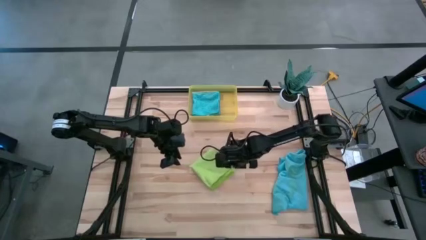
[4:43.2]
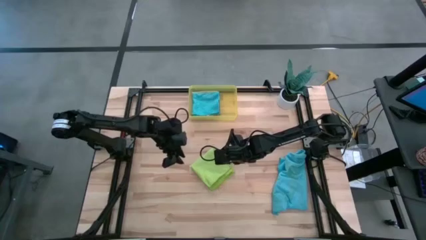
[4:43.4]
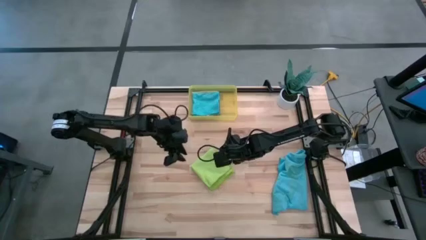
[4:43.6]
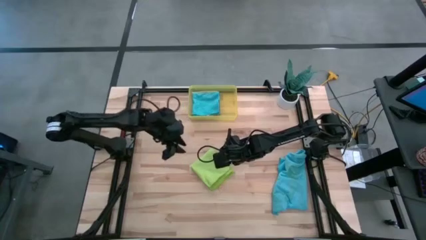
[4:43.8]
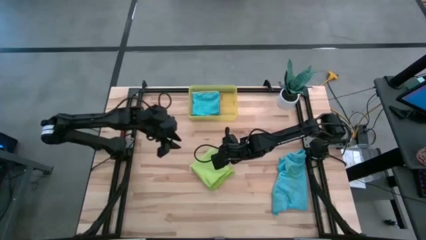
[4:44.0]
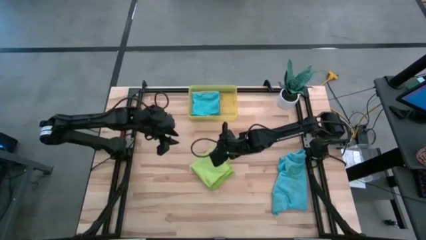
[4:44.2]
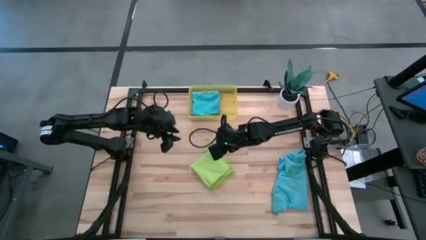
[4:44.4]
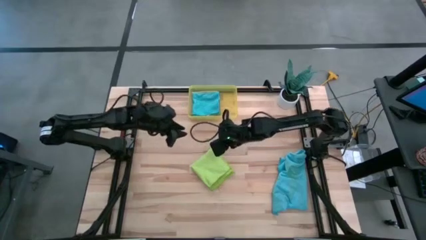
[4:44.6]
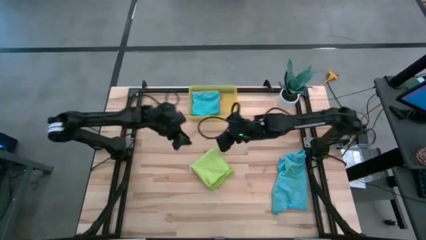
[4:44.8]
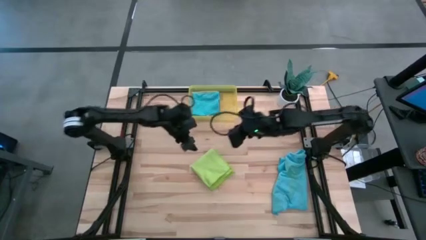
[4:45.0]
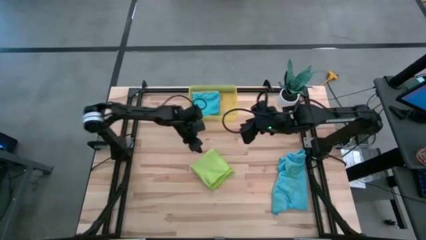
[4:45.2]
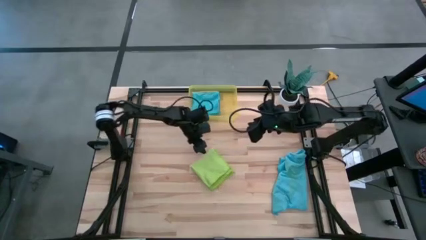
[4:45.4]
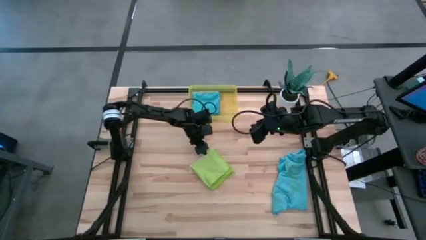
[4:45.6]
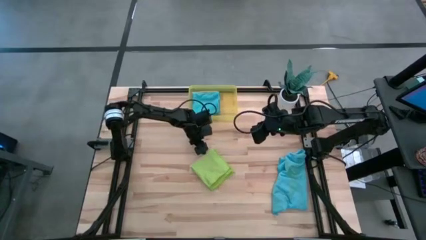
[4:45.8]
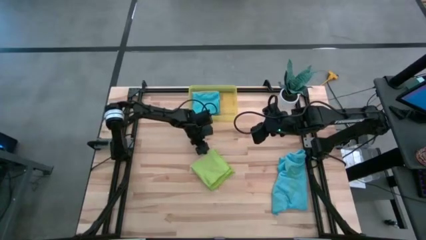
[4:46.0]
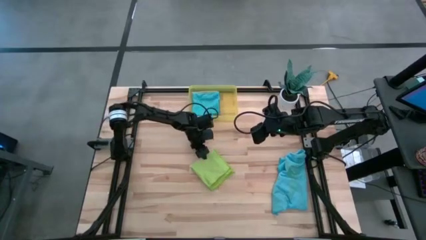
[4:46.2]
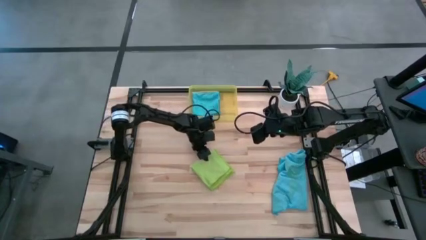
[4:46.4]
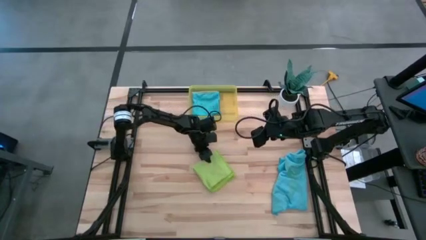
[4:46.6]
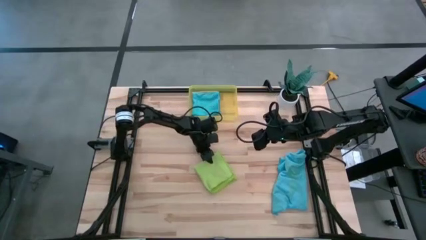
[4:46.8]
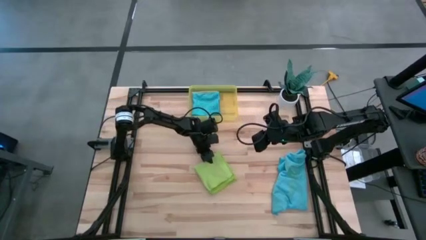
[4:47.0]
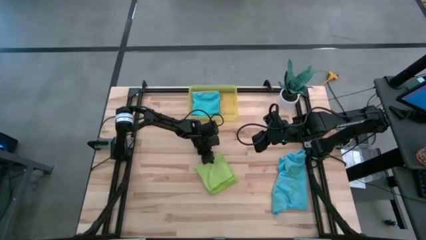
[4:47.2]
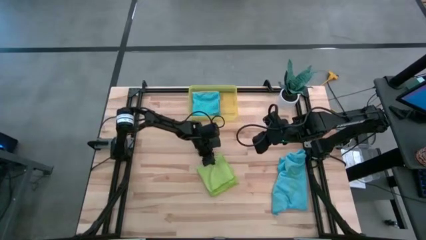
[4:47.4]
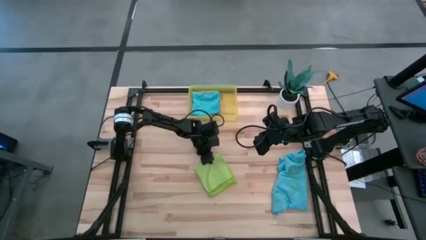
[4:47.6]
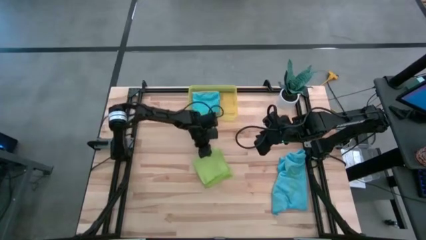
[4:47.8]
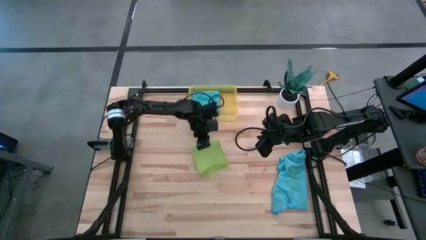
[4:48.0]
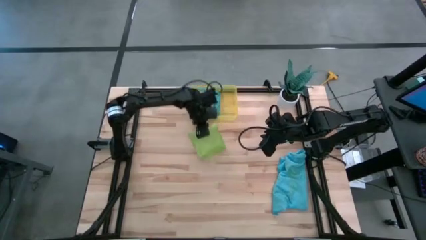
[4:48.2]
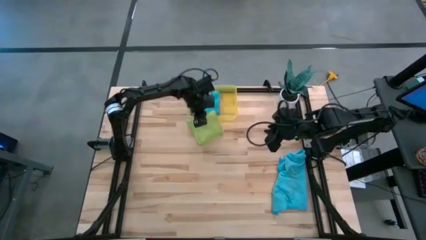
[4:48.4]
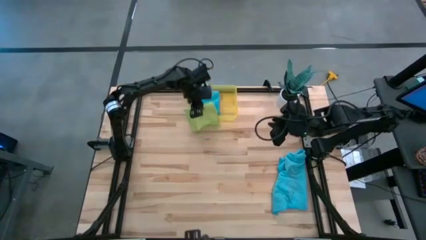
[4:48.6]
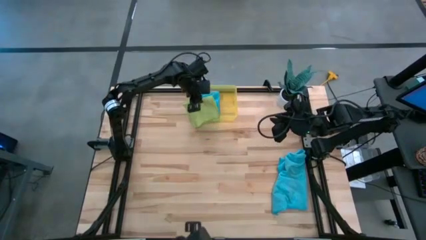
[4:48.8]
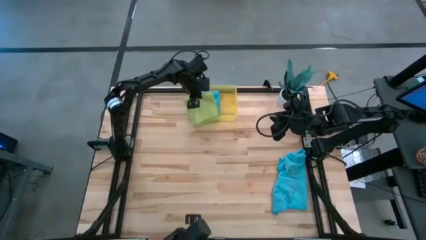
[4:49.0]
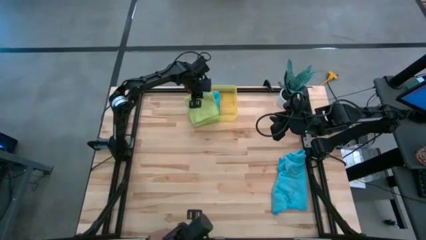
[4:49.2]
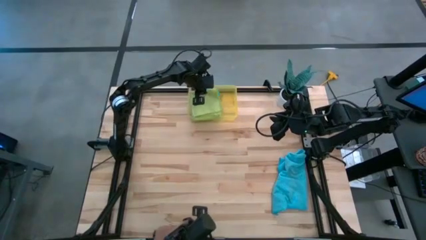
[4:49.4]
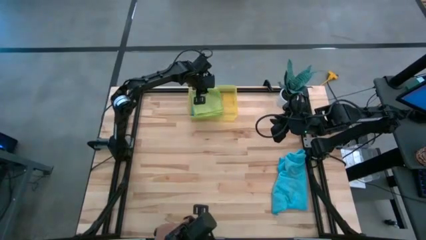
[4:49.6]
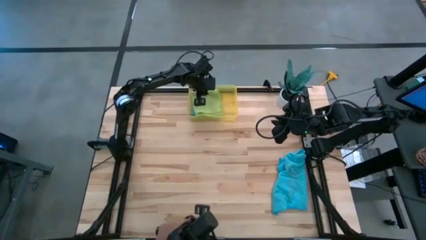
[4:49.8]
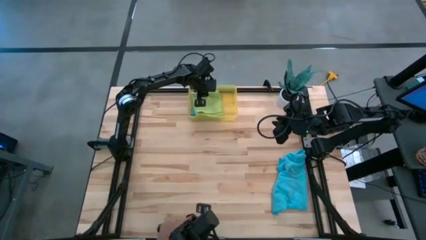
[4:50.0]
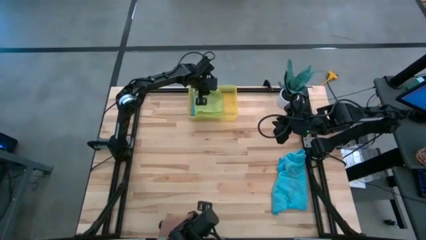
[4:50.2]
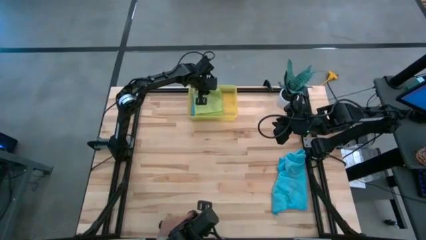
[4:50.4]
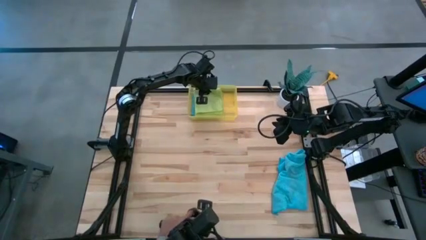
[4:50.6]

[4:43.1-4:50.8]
Task: Fold microfiber towels
Stack the green microfiber cloth on the blue microfiber cloth in the bin

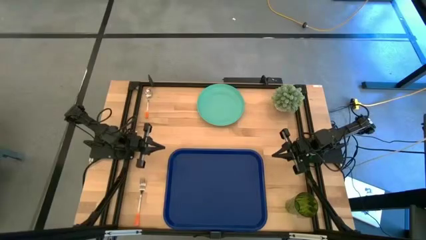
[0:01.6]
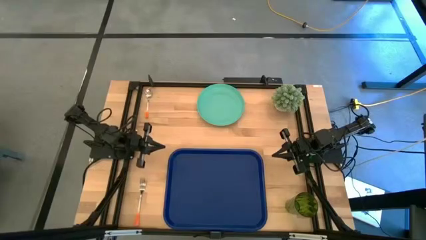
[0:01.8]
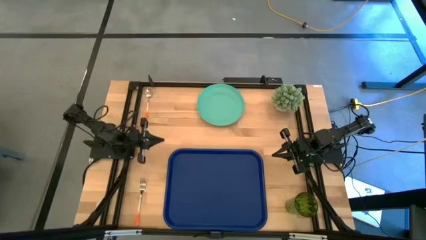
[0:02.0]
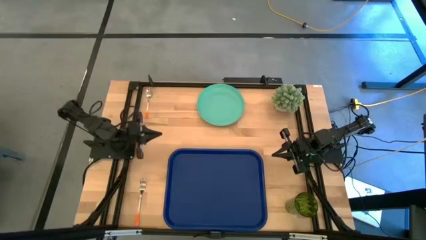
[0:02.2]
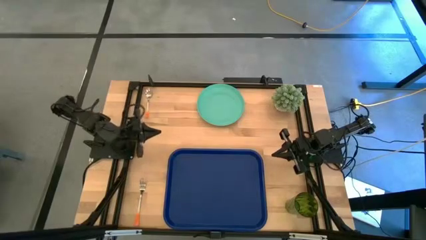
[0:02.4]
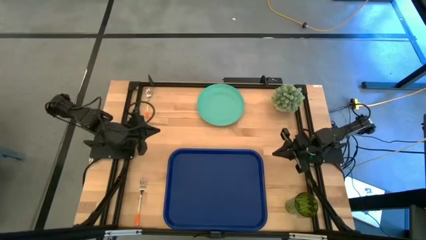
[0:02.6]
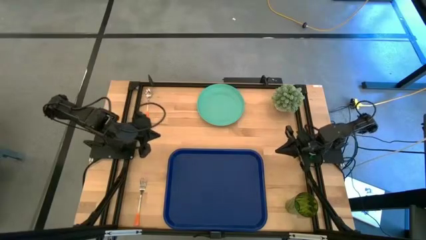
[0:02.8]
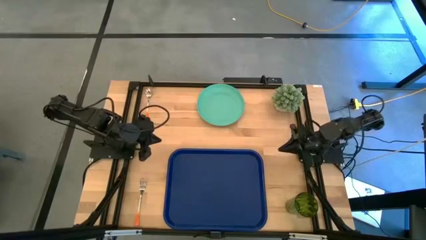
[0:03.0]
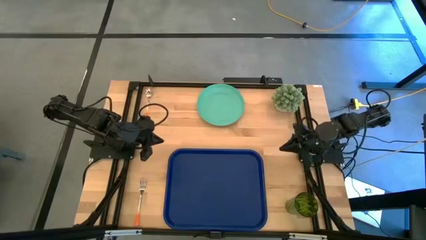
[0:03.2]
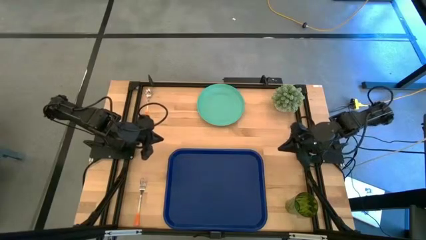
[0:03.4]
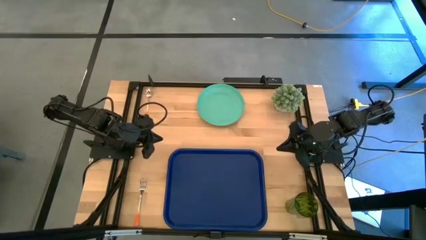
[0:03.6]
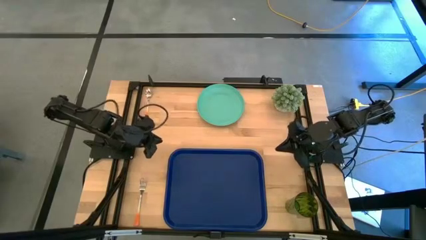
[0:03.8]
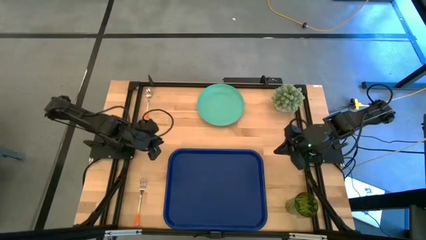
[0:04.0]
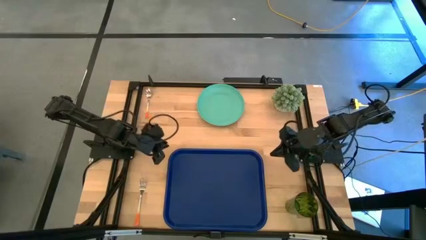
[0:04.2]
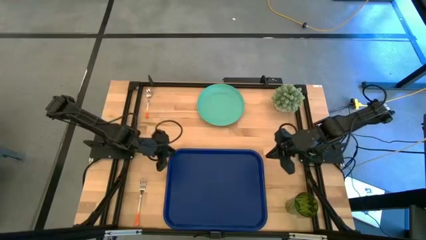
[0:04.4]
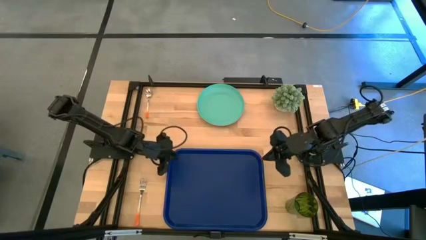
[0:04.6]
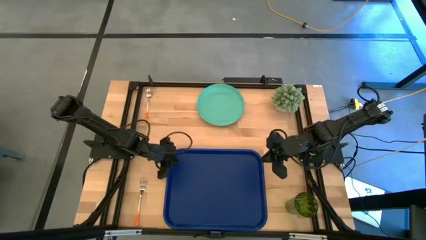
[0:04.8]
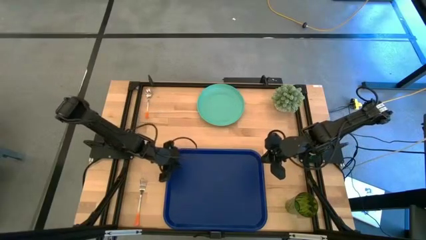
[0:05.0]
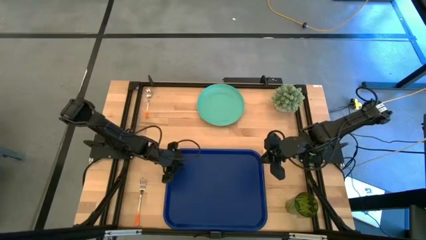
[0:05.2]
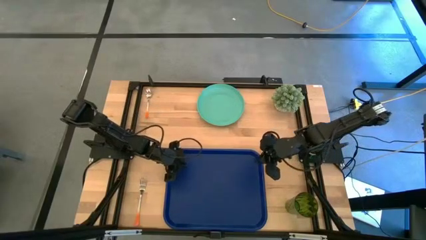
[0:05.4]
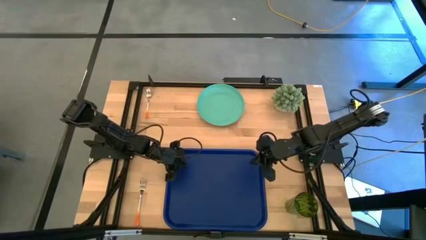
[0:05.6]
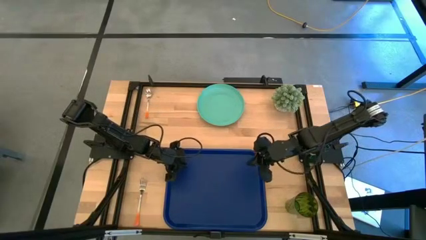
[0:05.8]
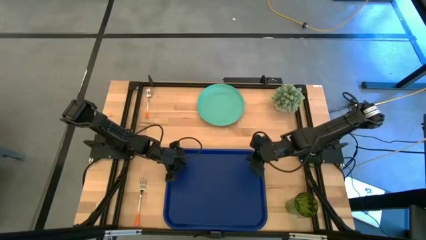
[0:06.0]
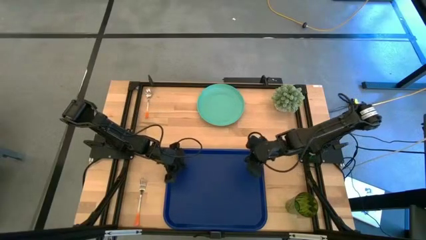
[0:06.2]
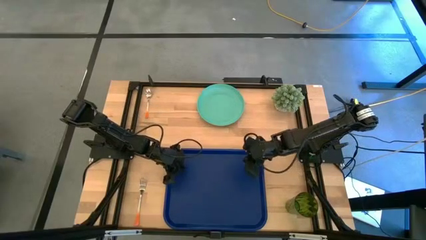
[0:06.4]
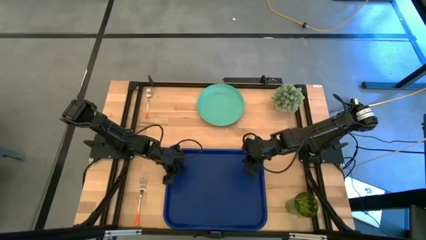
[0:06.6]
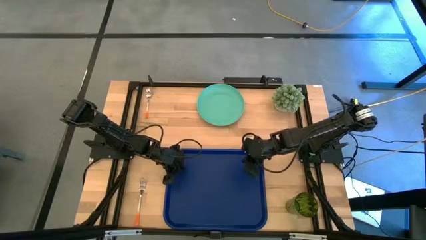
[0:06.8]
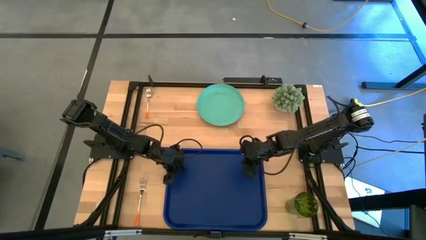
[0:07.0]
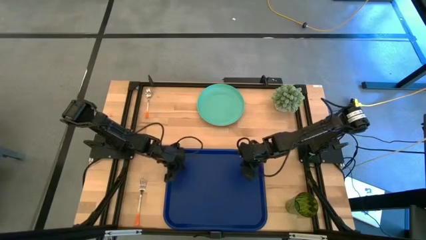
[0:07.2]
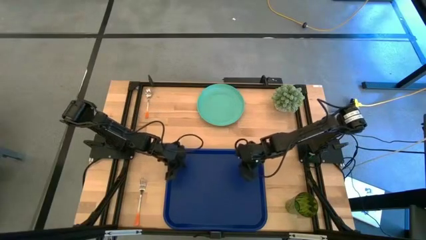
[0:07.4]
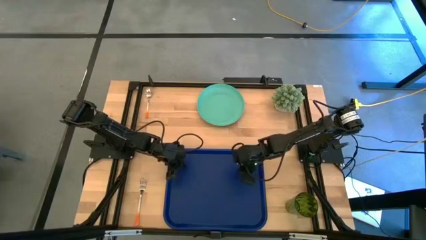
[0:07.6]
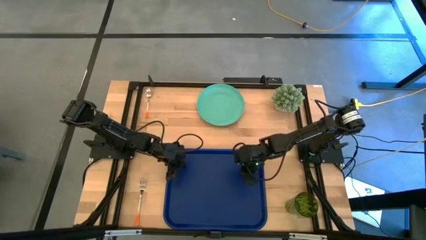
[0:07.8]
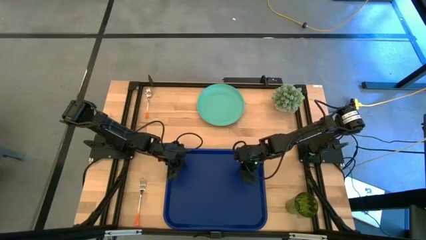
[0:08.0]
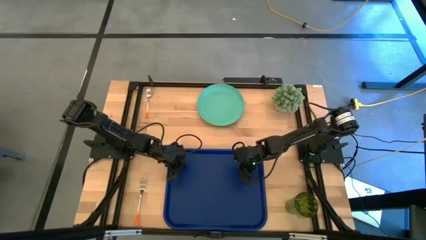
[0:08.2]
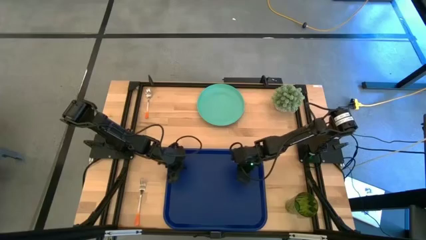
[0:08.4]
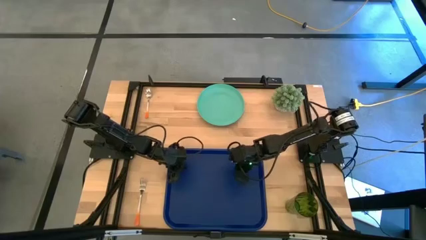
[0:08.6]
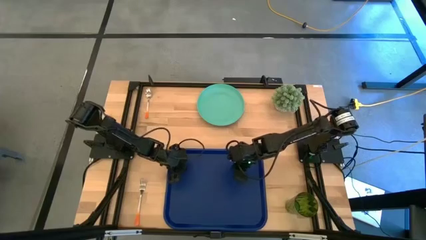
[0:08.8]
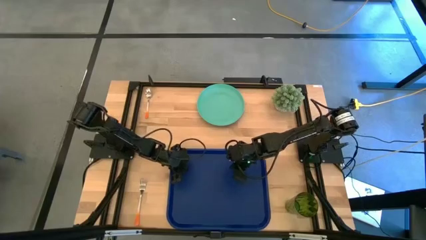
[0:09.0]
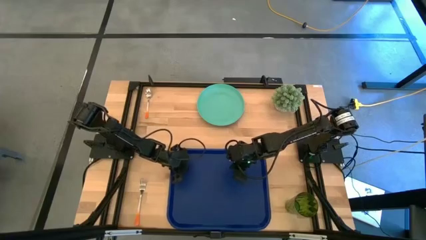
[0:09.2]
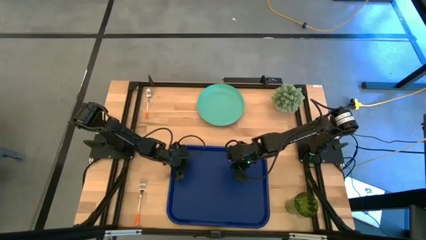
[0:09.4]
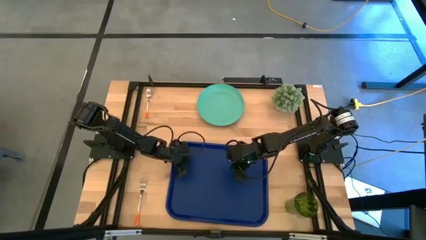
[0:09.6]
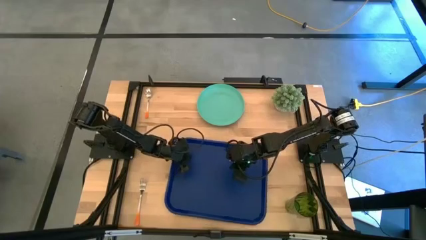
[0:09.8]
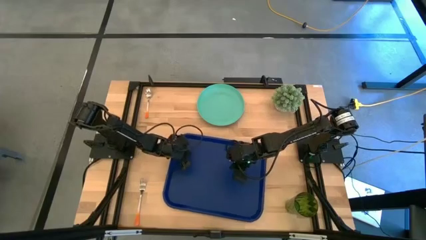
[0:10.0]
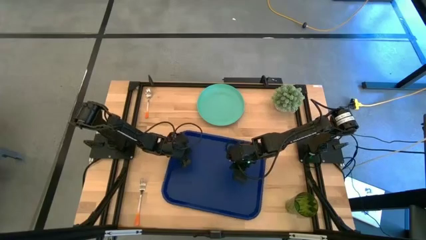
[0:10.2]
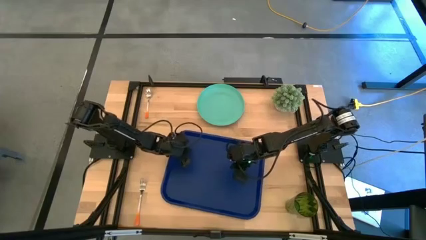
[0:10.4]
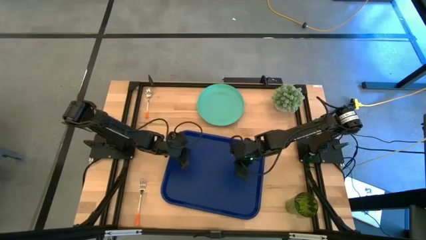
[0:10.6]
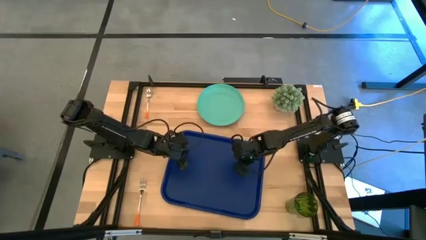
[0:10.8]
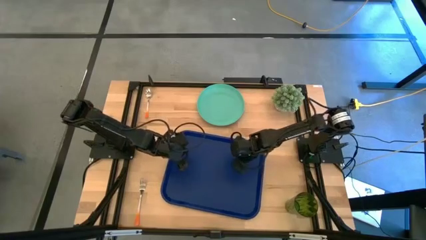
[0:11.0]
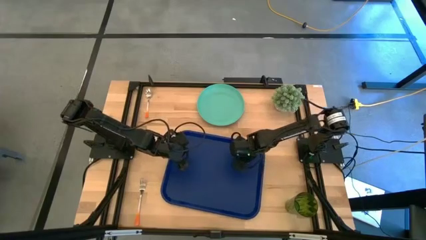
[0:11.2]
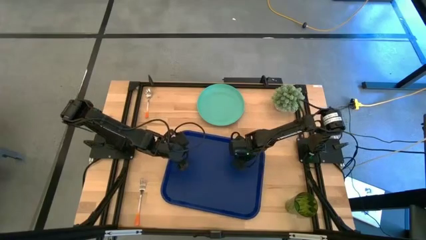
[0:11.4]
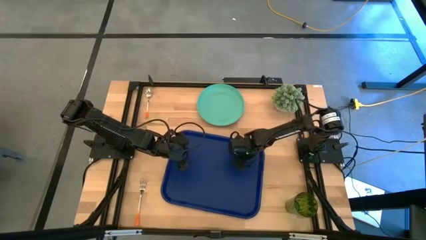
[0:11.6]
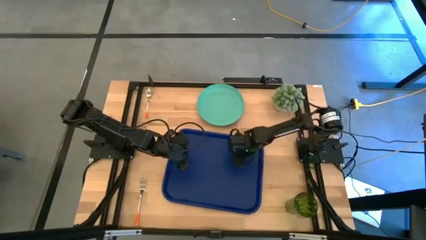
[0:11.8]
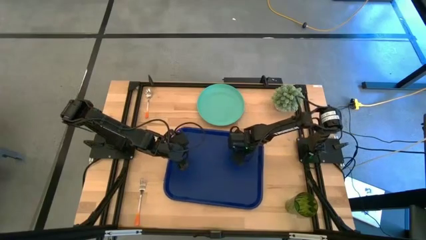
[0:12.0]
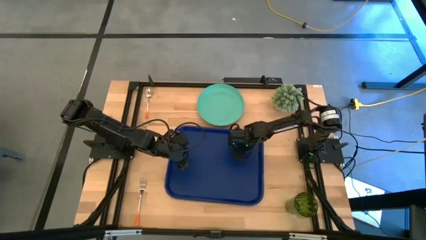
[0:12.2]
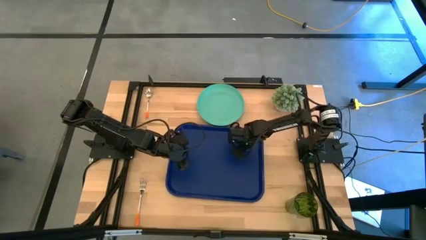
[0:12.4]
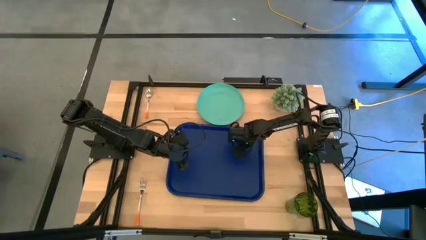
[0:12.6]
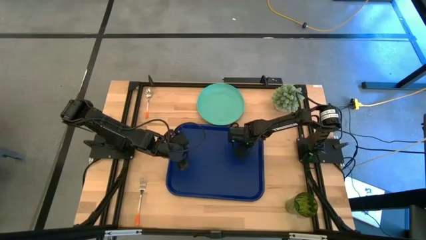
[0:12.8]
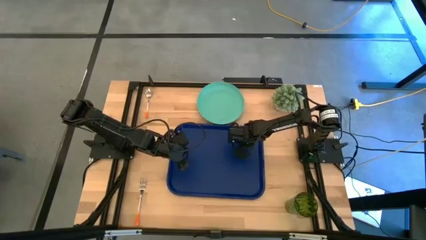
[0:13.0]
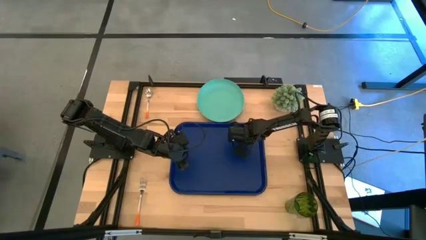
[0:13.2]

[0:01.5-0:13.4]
Task: Pick and place plate/cup/fork/spoon on tray
Move the blue tray to the center of the table
